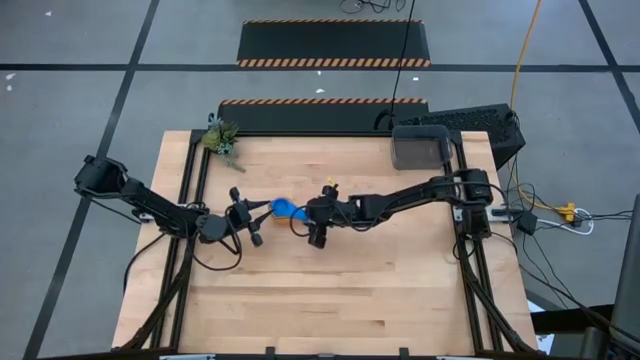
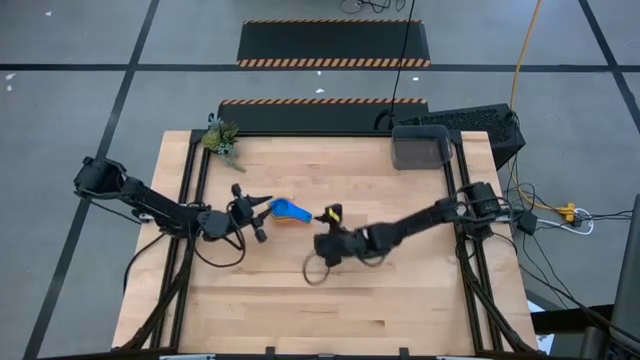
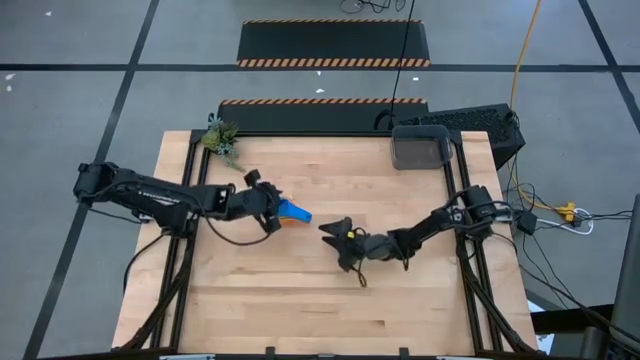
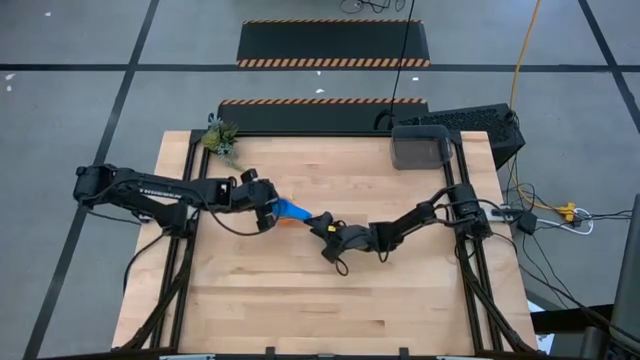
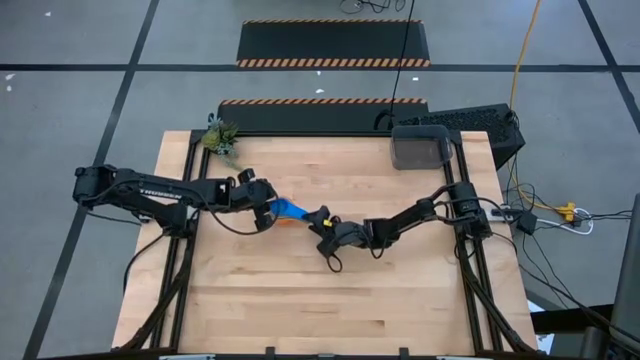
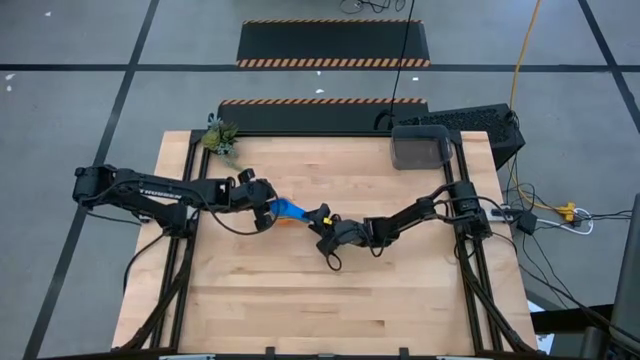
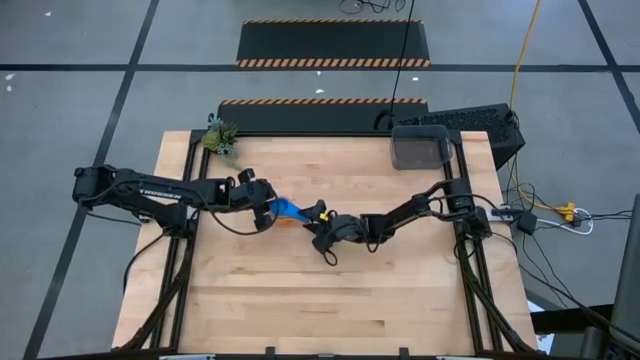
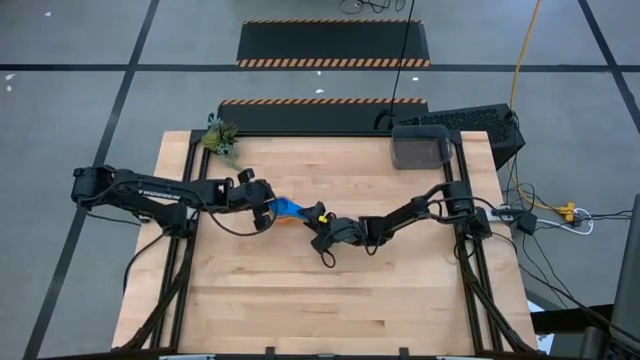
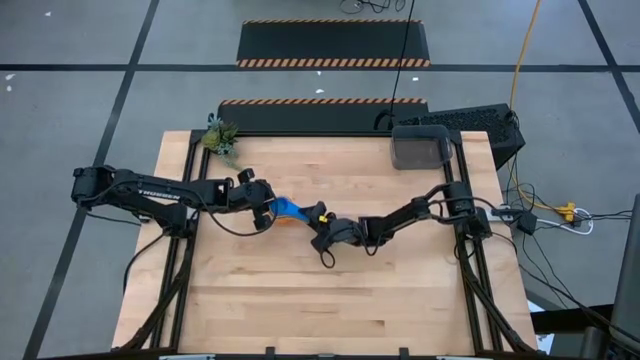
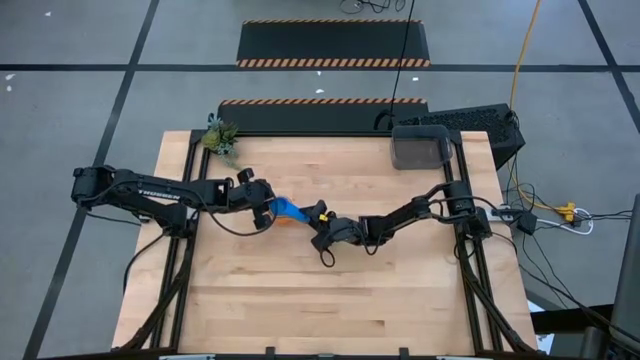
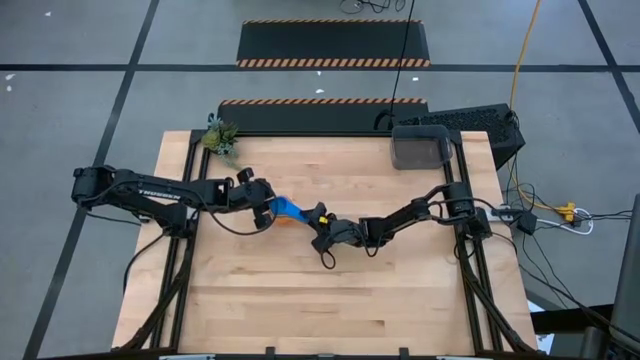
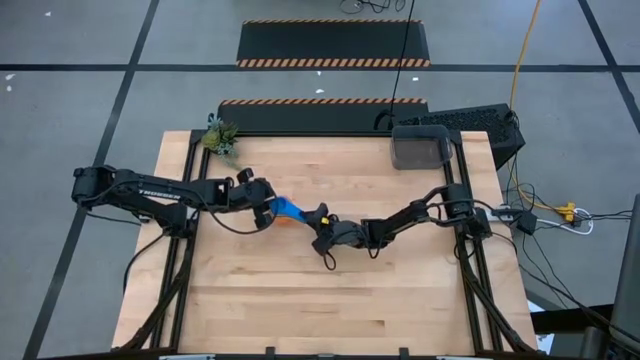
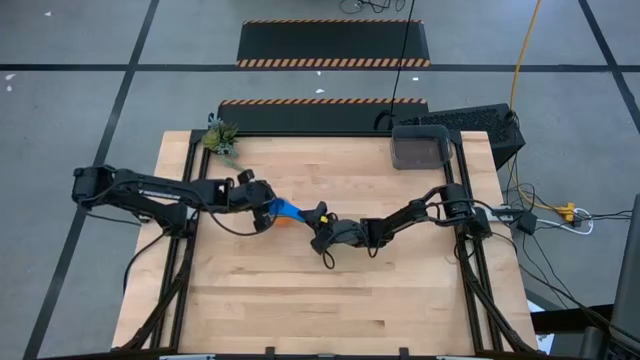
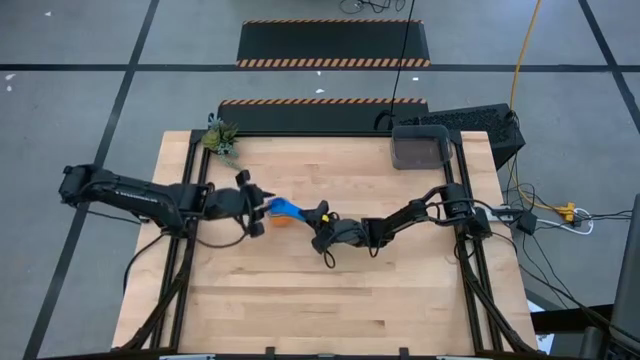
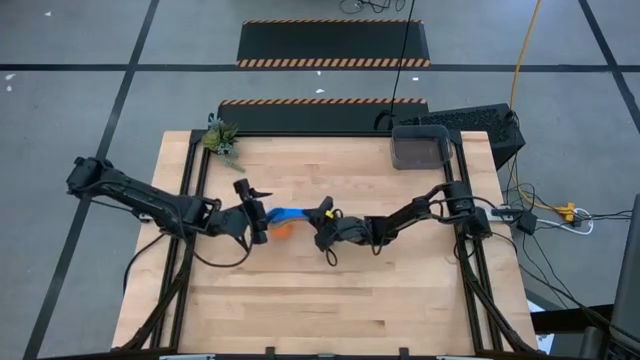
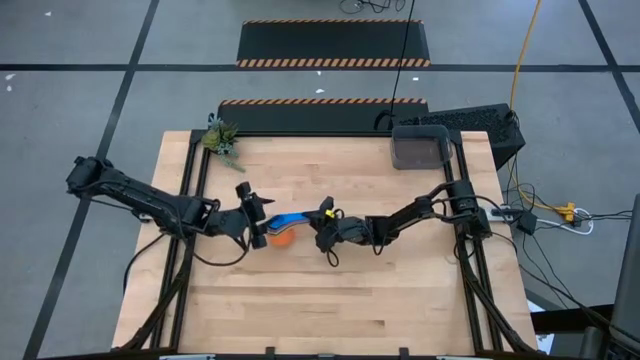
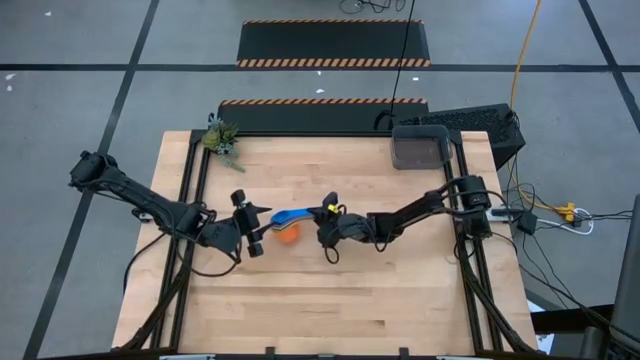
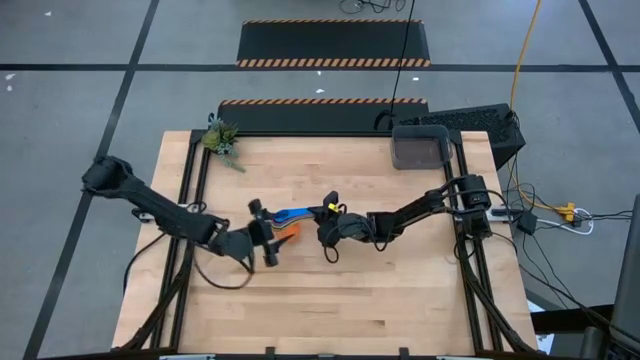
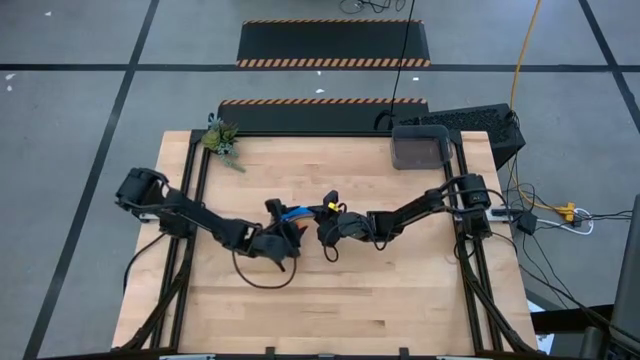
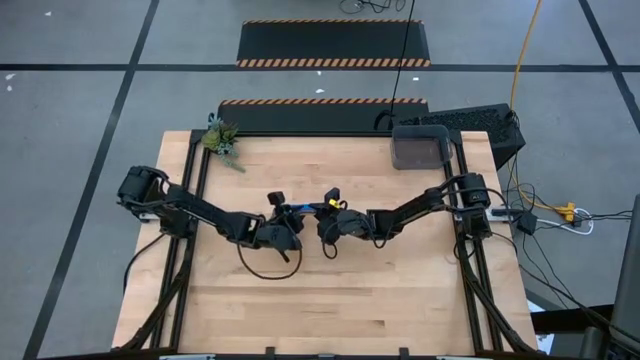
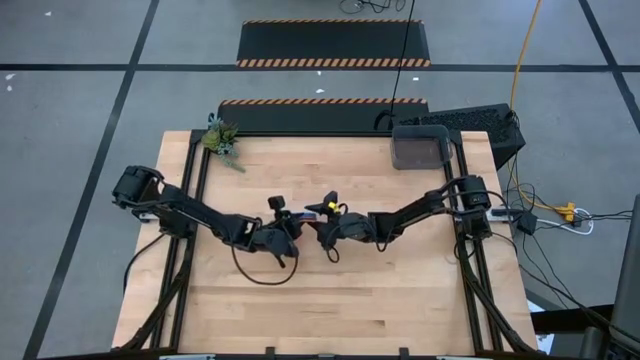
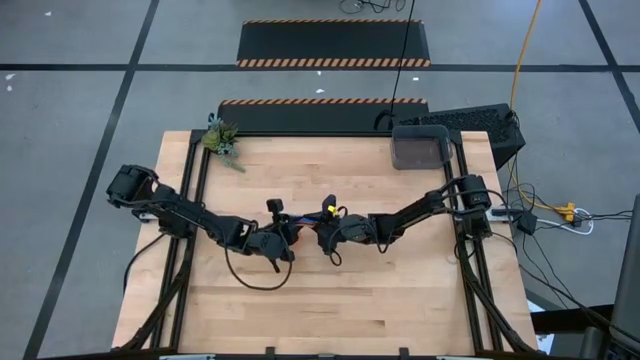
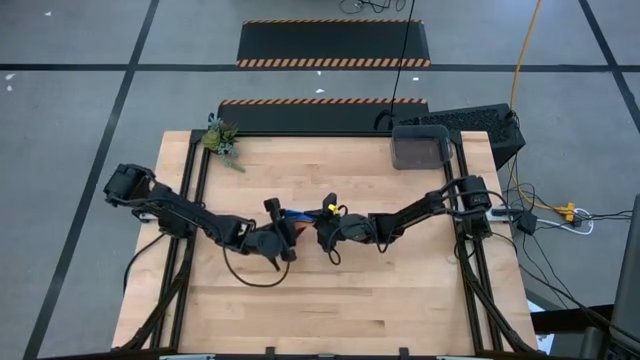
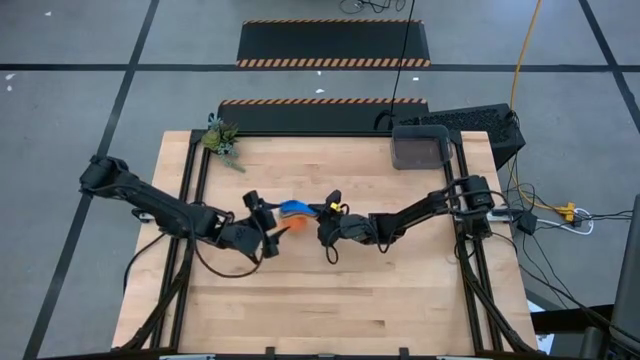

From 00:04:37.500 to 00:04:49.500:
Task: Nest measuring cups in basket
Put the stack of measuring cups into the black bin

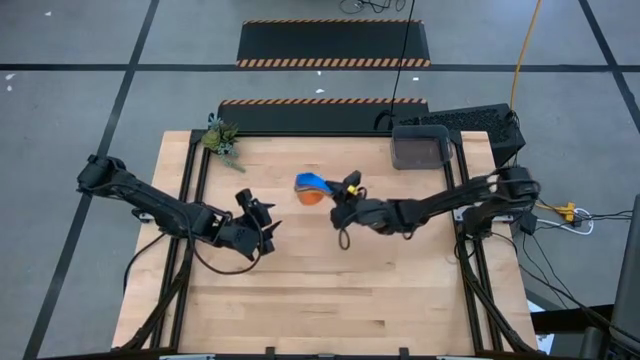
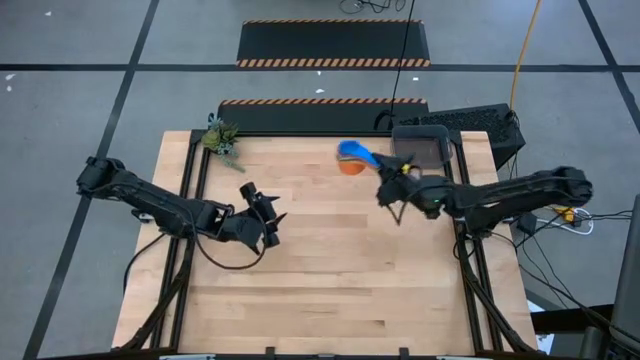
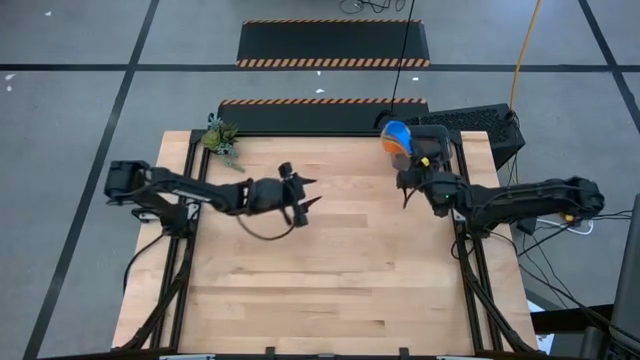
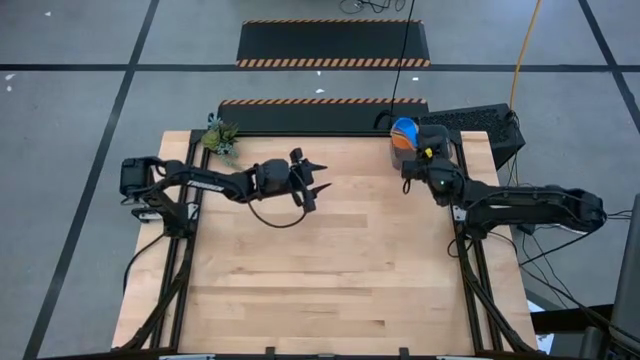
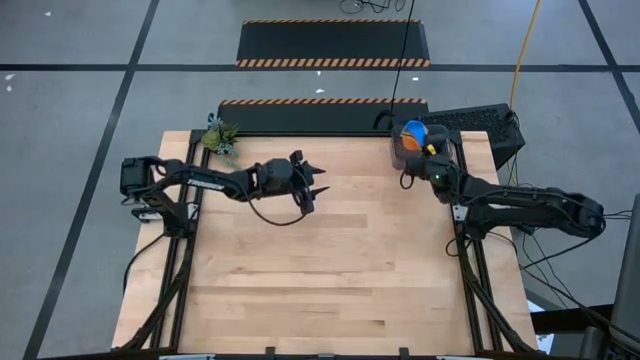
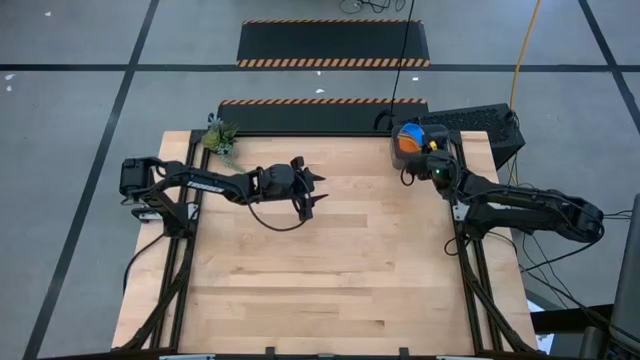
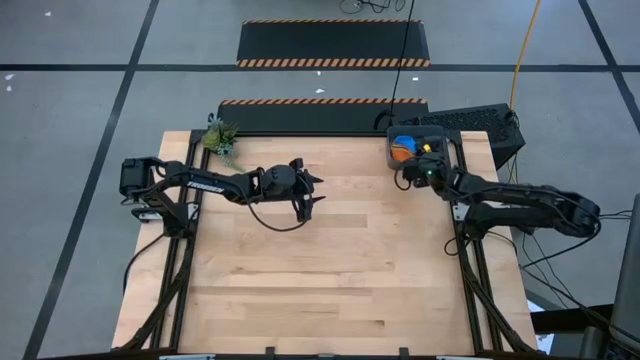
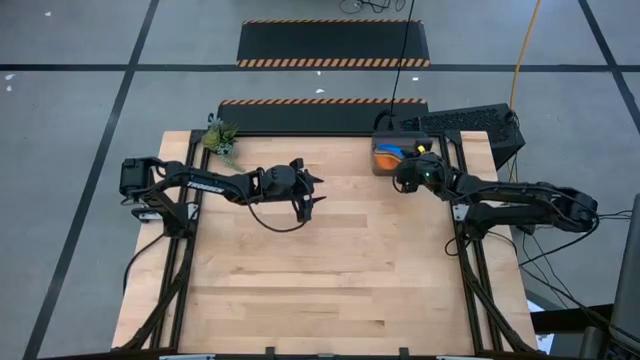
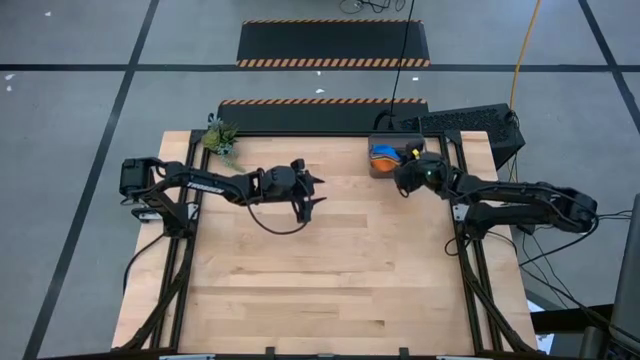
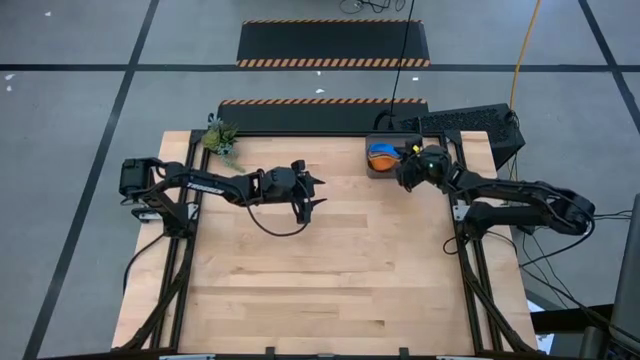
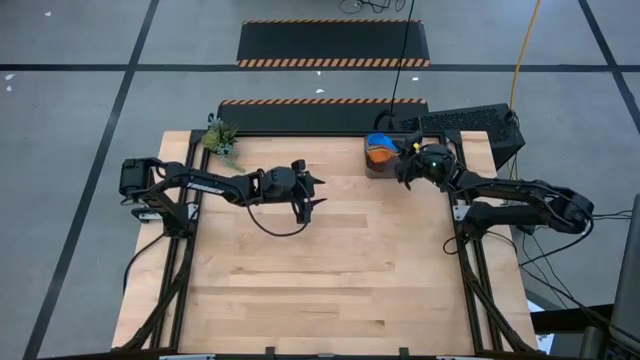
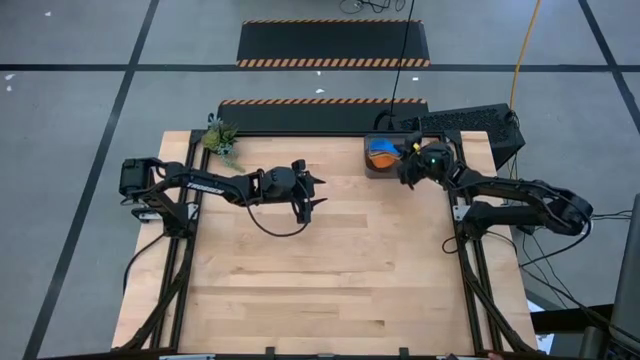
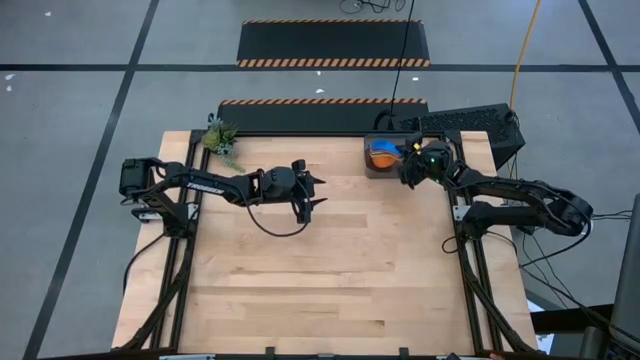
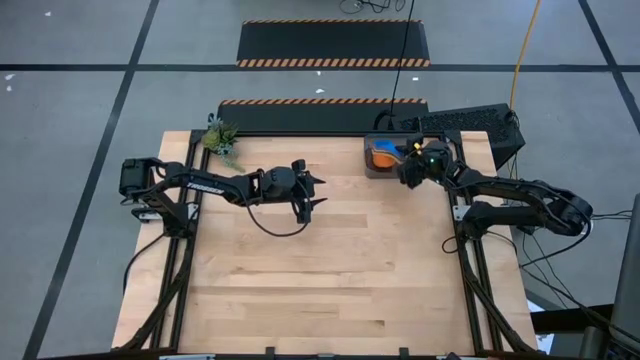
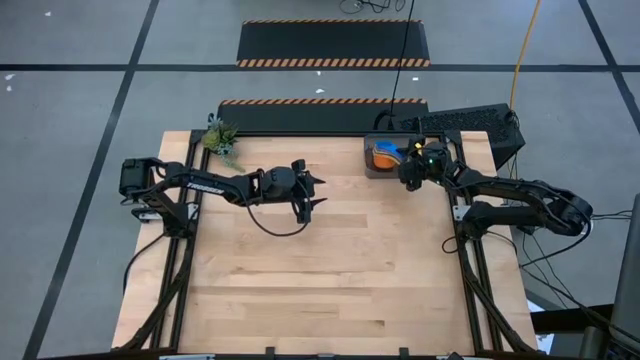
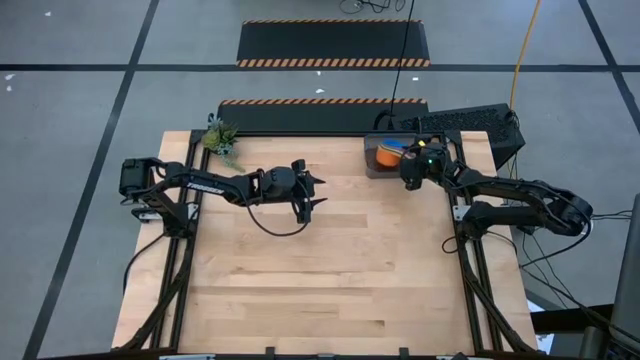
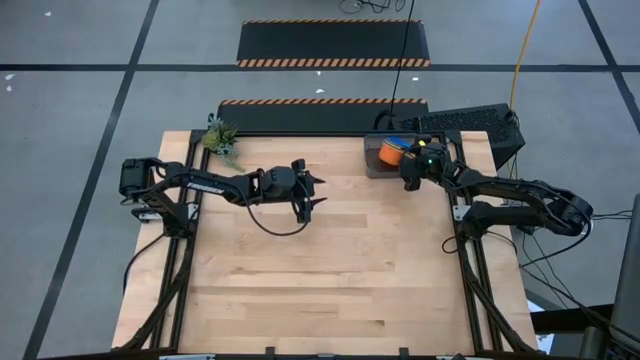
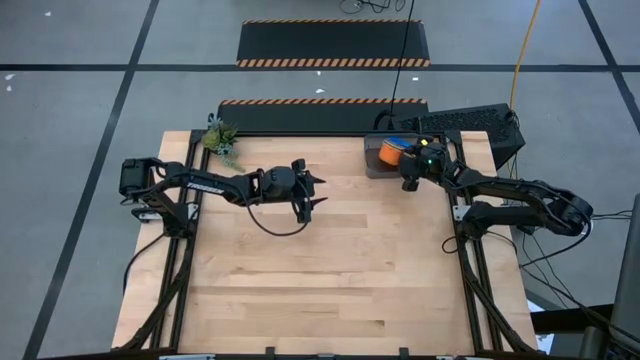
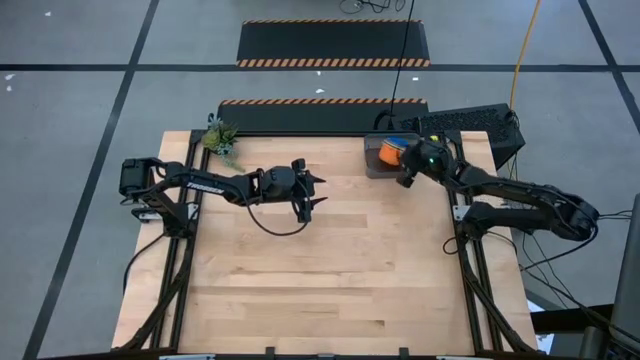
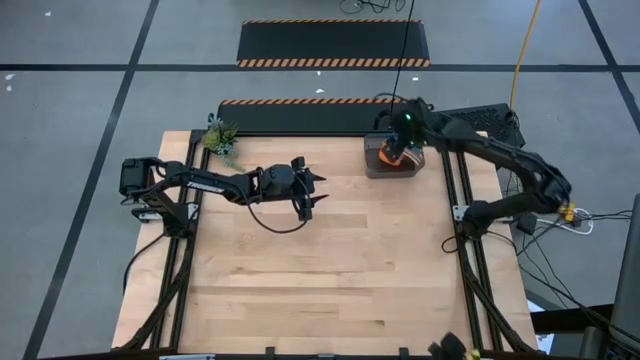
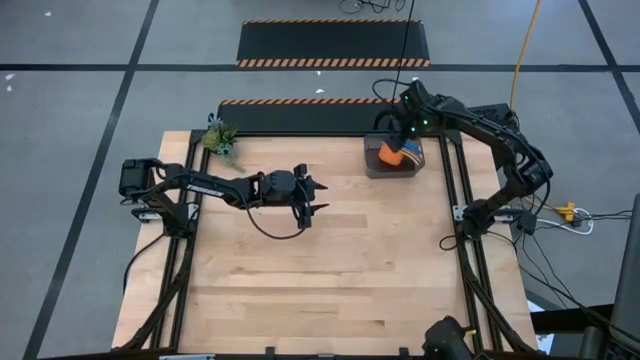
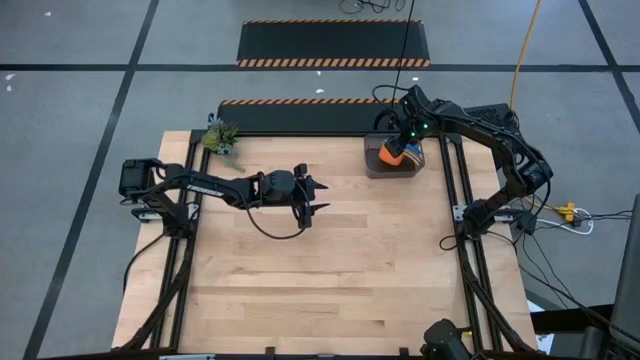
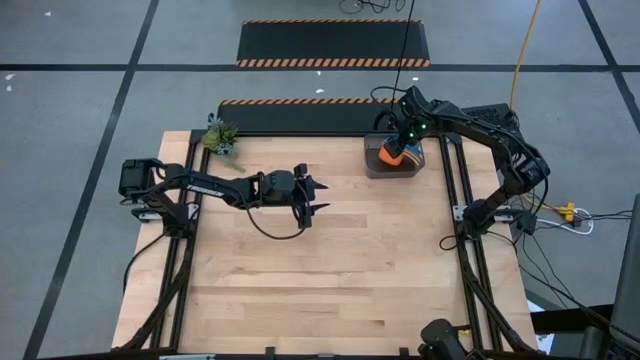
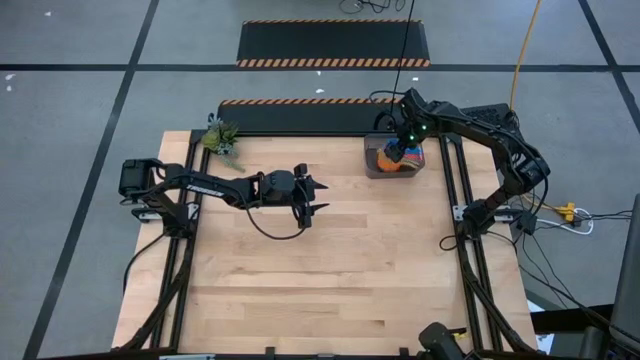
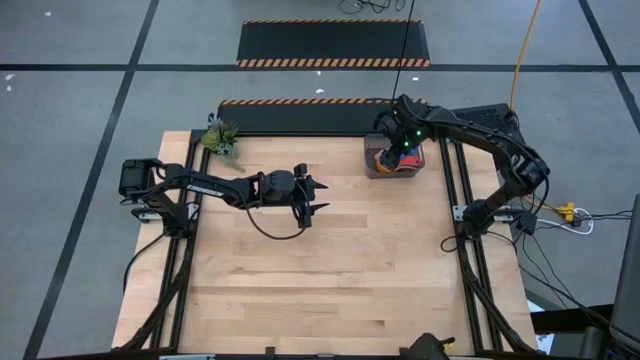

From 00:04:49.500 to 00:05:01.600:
Put the stack of measuring cups into the black bin
